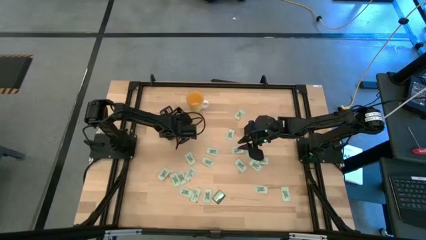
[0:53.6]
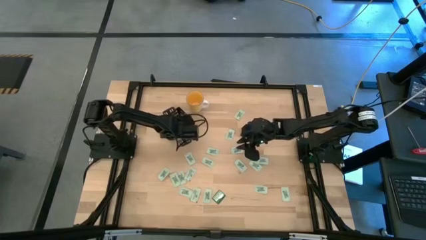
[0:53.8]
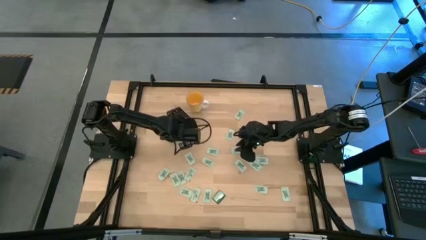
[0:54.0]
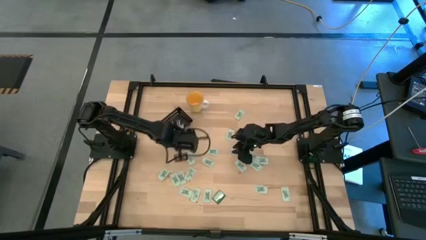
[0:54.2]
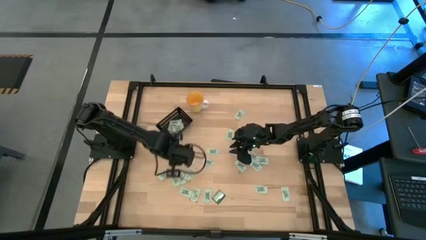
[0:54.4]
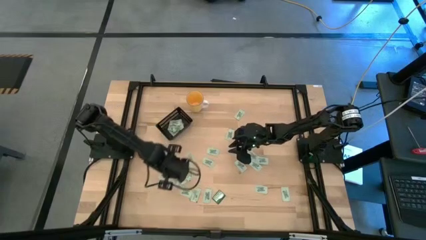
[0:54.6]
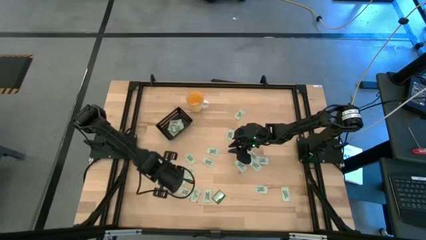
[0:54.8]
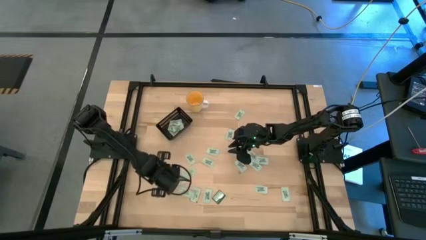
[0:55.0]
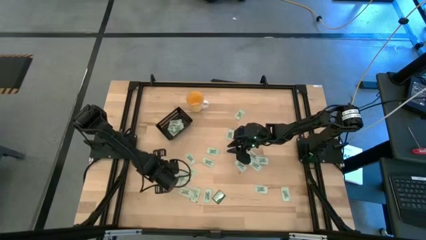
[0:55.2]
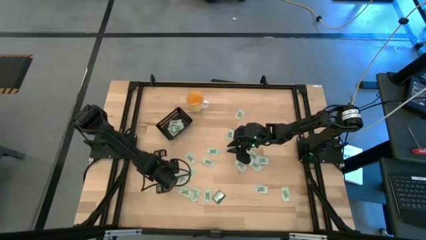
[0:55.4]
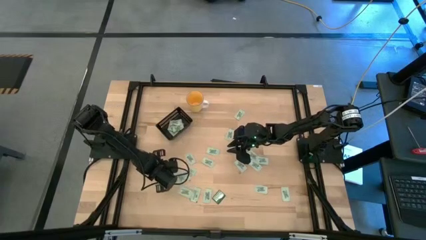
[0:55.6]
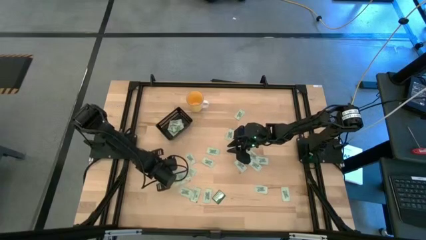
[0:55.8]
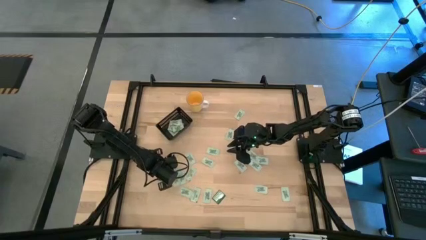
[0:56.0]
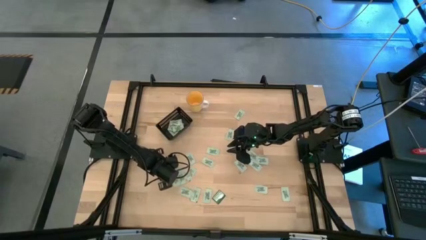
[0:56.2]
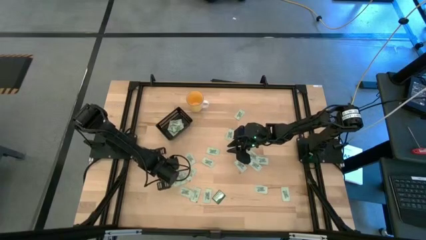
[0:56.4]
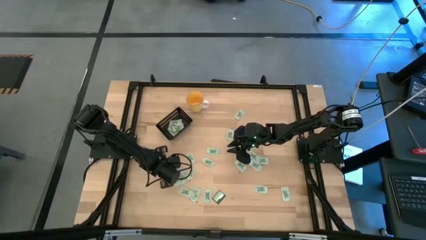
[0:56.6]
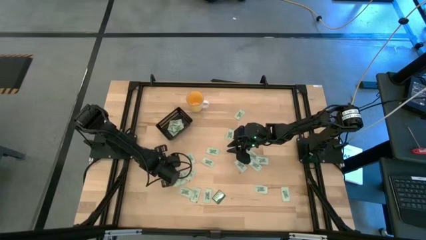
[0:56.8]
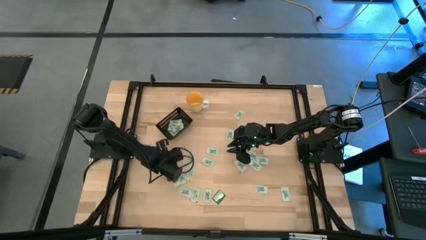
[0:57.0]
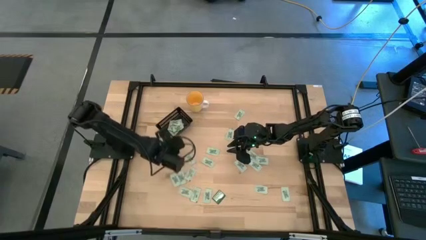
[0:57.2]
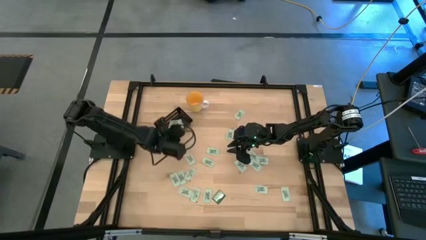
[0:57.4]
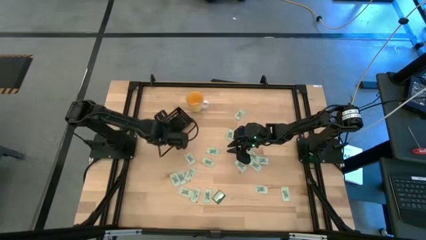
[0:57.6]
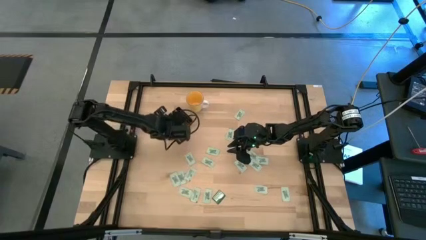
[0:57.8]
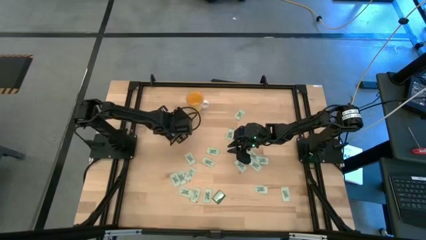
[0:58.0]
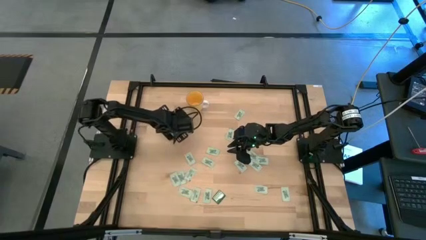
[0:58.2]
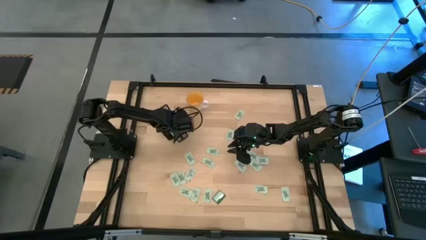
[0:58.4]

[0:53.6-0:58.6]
Task: Pick and place Stevia / Truvia into bins
Put the green stevia packet into the black bin

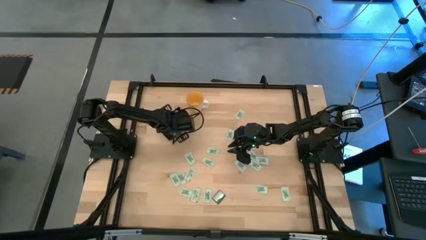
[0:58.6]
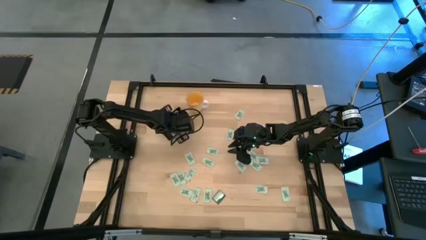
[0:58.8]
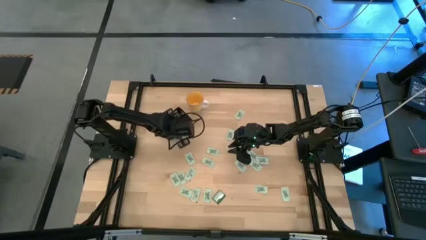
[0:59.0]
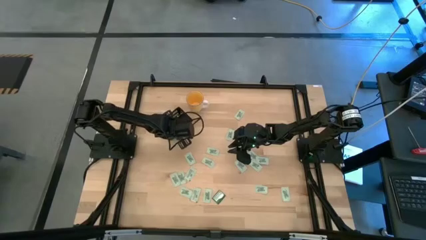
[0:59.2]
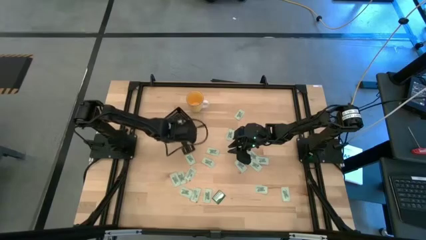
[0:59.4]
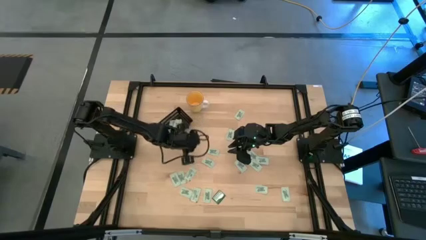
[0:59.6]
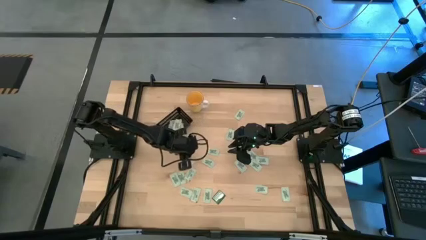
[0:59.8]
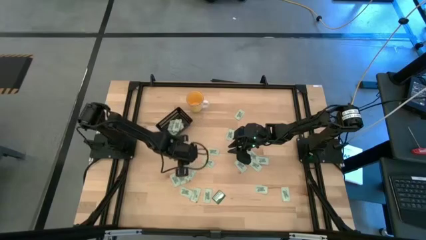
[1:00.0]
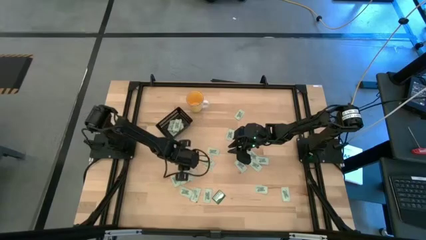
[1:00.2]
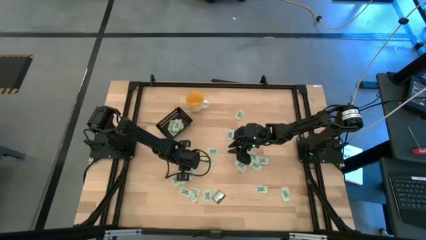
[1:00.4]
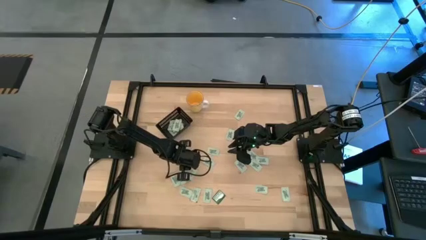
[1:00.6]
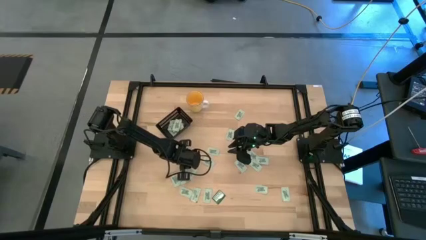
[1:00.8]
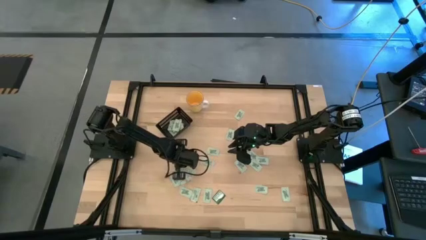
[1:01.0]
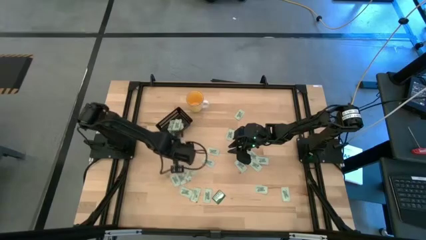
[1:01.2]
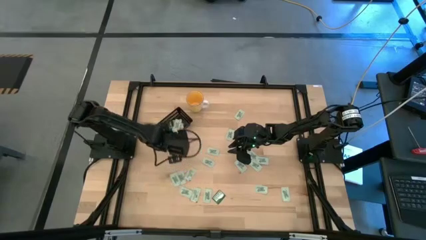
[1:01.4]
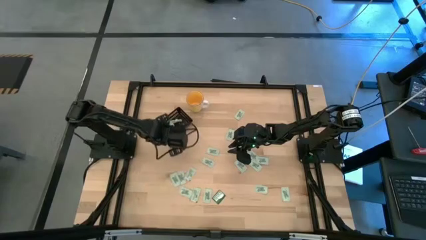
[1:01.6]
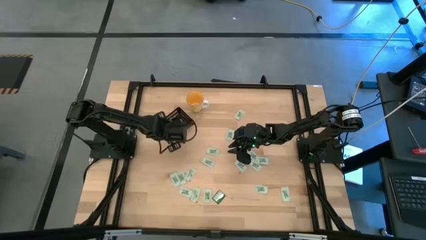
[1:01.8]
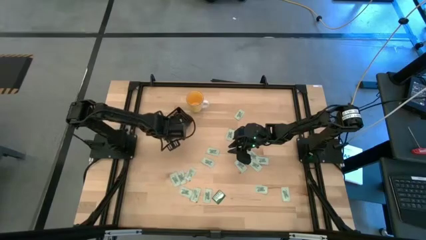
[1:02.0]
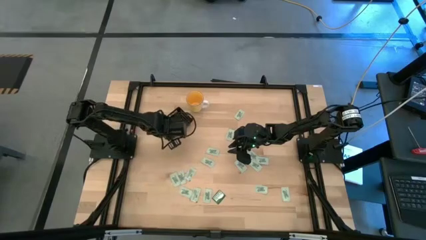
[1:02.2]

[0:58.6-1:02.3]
Put the green stevia packet into the black bin

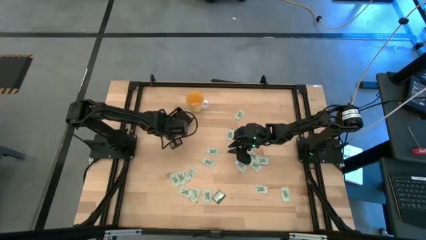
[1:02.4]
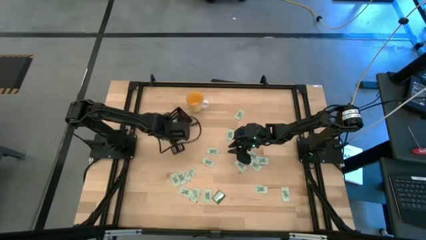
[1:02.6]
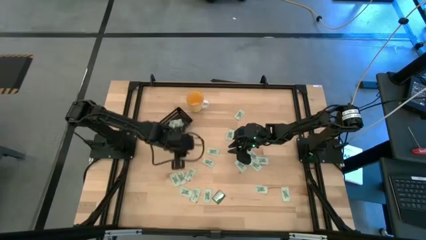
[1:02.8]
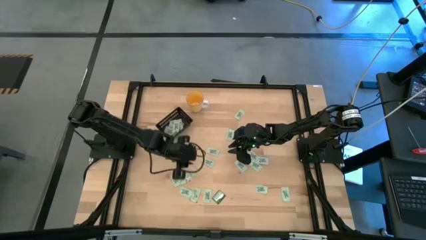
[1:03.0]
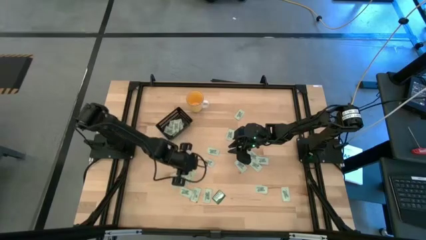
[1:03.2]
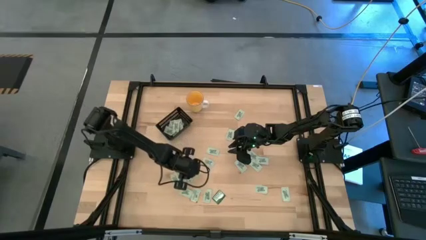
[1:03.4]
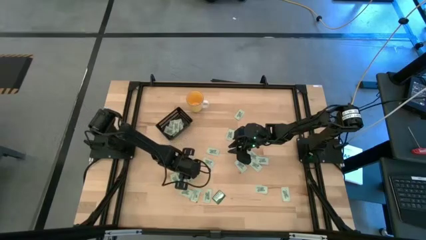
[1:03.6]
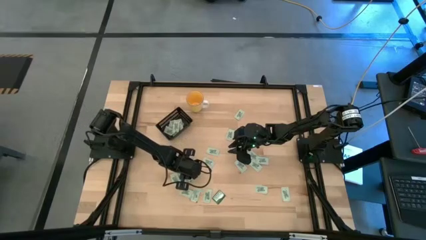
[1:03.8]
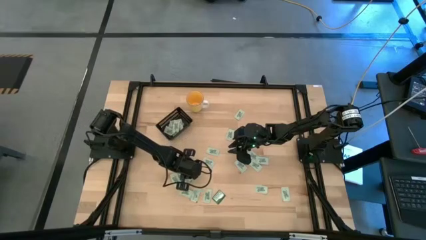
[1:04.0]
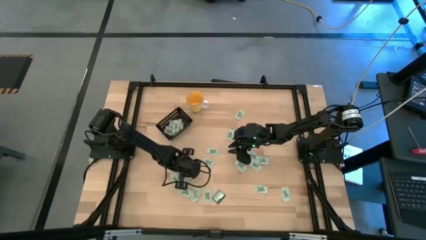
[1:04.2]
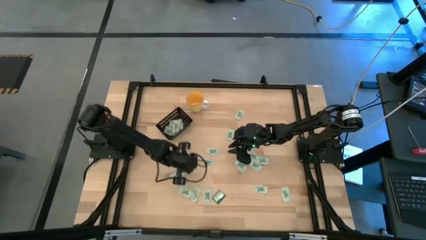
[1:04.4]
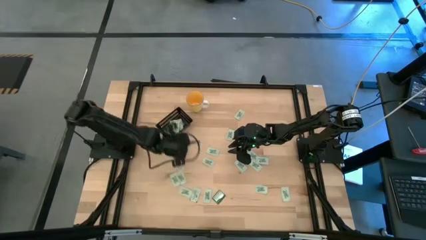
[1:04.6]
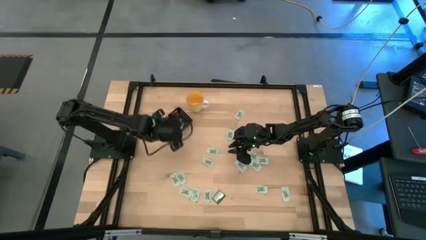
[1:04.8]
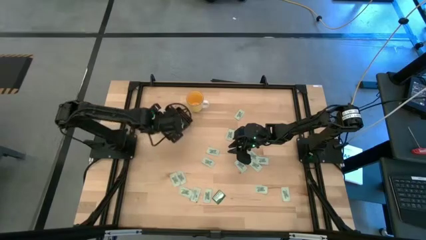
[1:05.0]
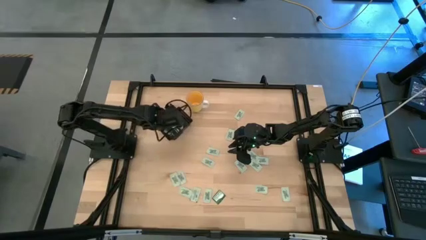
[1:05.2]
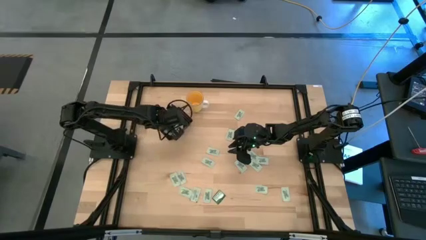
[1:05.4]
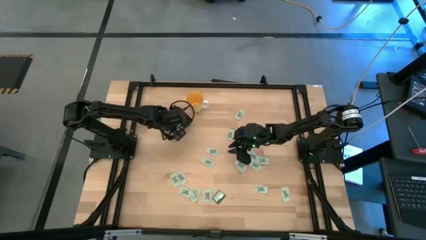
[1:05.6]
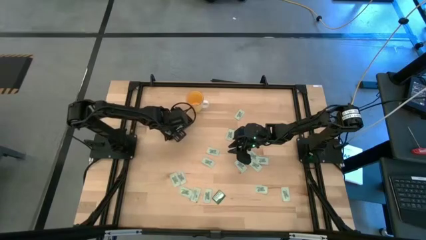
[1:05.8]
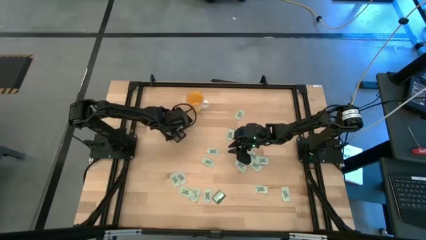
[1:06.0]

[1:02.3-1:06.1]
Put the green stevia packet into the black bin

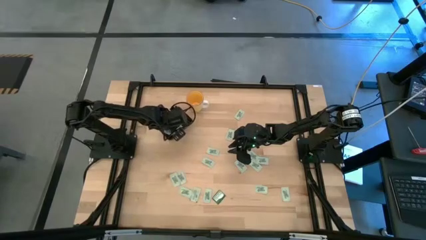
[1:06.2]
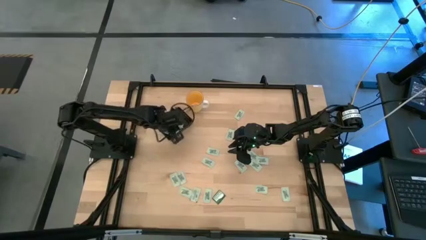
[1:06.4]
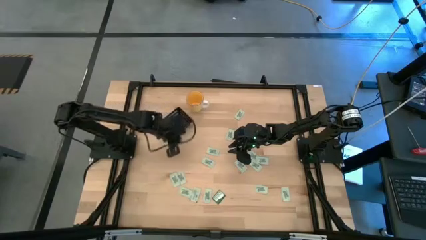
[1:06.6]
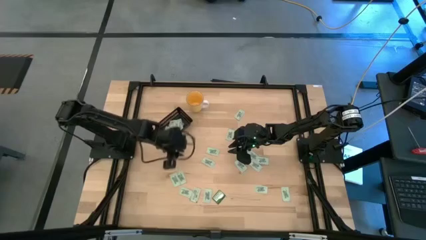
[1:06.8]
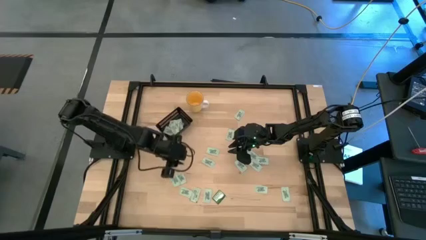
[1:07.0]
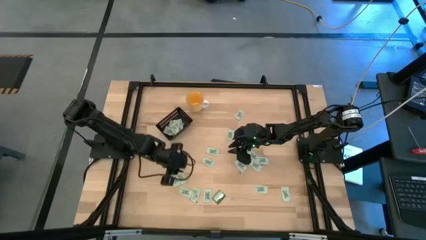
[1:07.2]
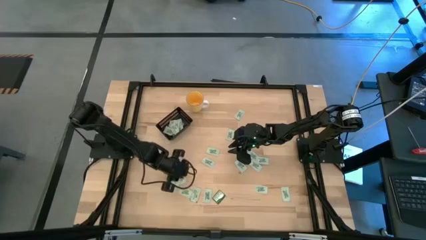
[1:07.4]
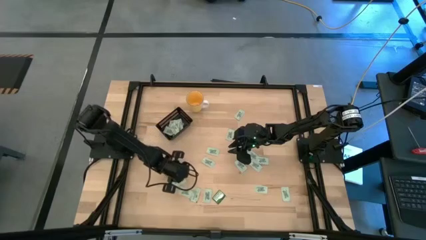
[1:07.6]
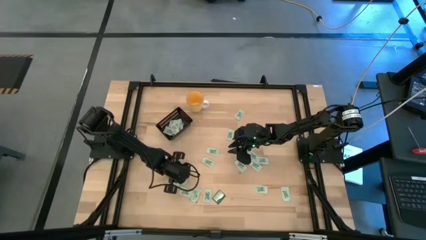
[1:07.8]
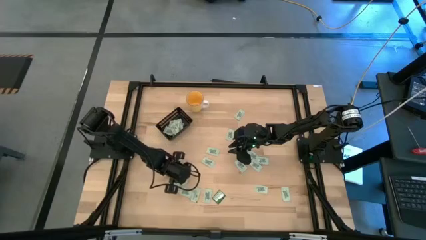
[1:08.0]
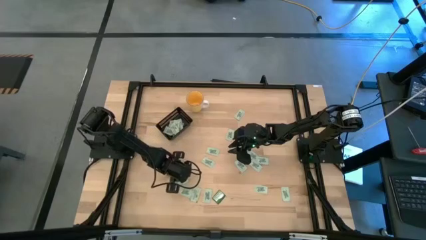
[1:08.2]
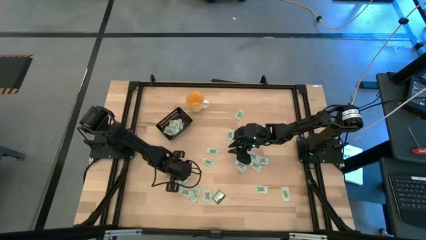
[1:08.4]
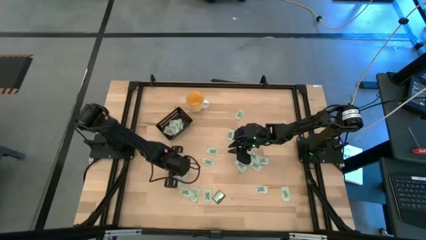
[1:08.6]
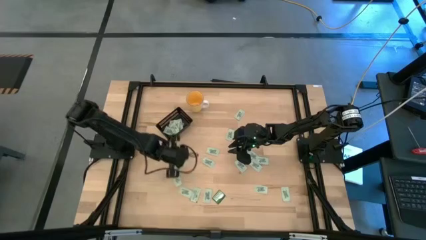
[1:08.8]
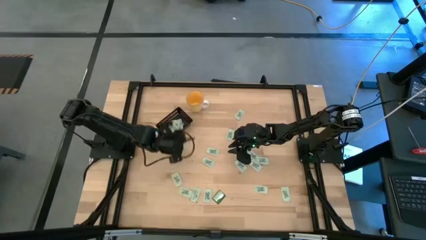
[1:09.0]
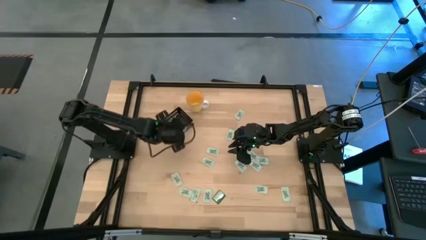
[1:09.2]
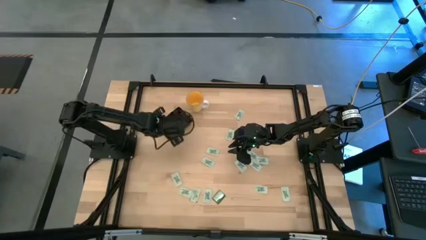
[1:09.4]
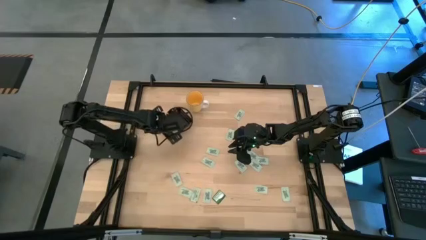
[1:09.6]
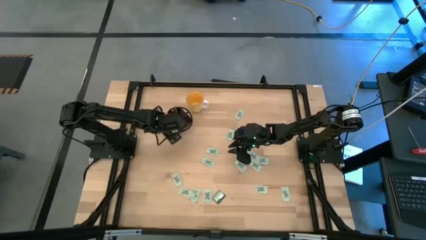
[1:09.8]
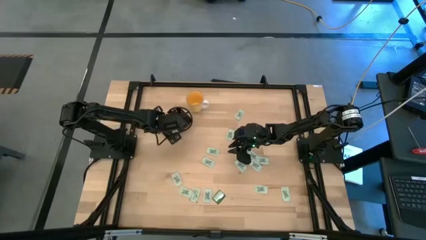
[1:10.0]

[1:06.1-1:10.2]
Put the green stevia packet into the black bin
